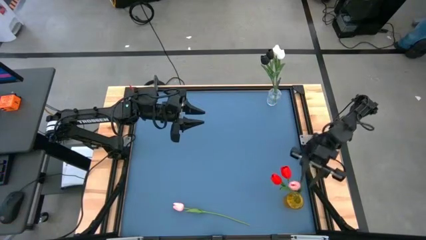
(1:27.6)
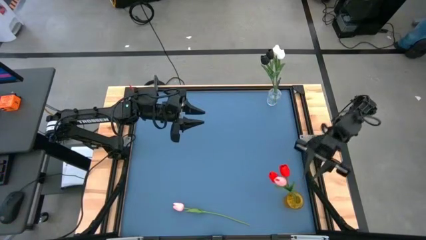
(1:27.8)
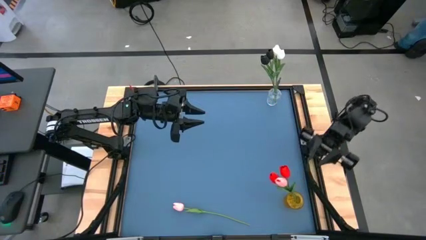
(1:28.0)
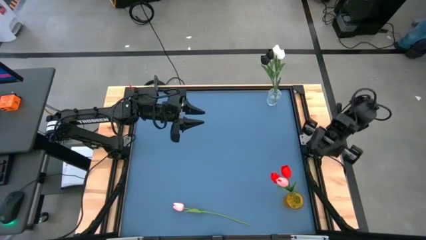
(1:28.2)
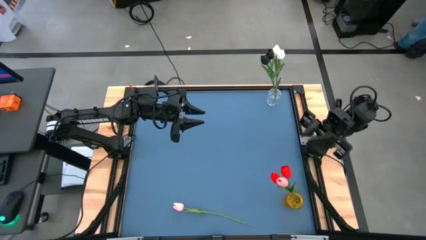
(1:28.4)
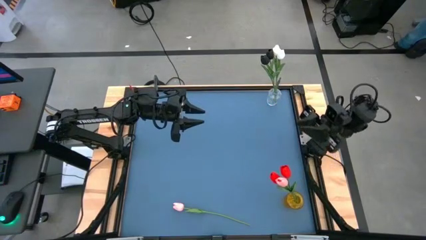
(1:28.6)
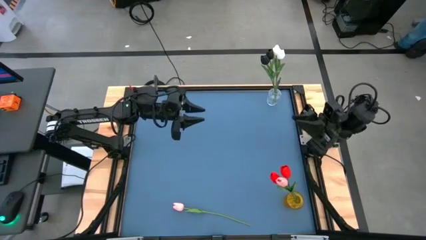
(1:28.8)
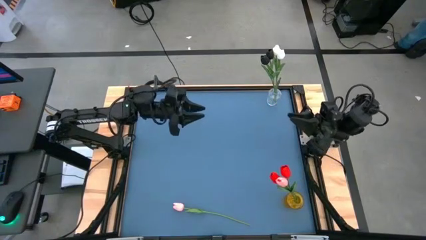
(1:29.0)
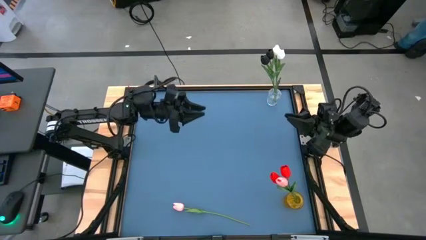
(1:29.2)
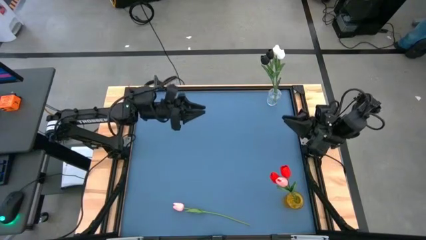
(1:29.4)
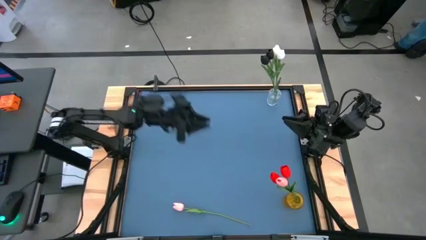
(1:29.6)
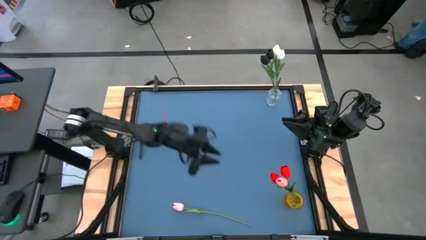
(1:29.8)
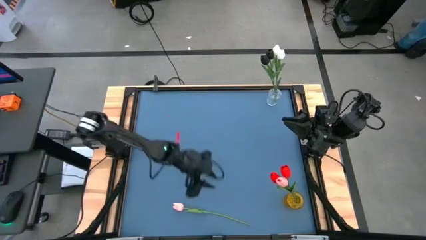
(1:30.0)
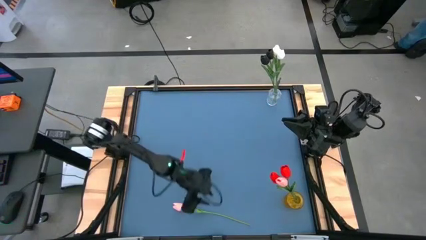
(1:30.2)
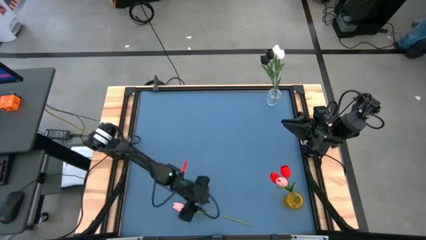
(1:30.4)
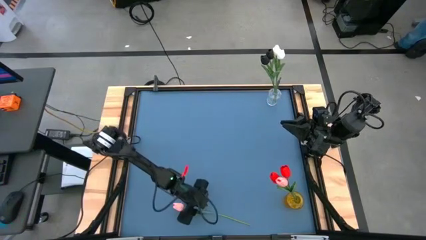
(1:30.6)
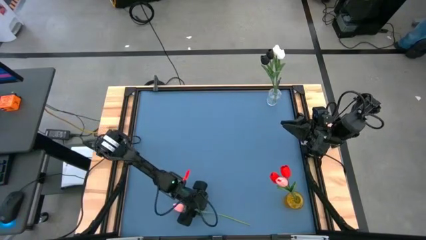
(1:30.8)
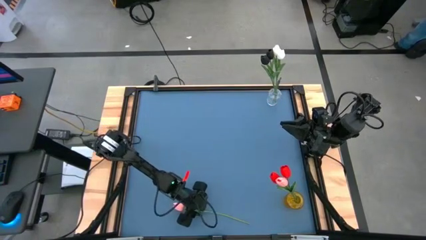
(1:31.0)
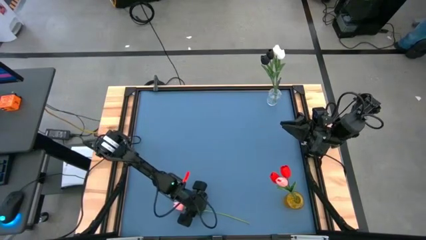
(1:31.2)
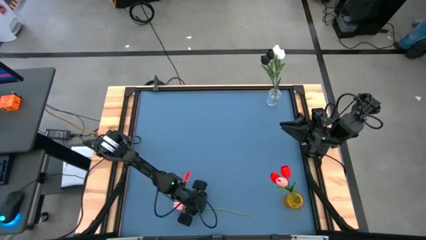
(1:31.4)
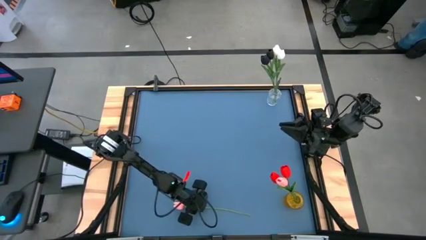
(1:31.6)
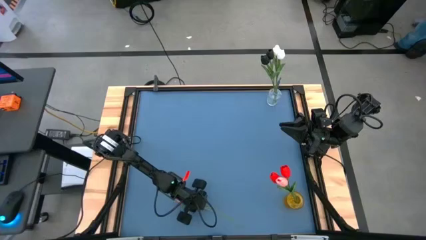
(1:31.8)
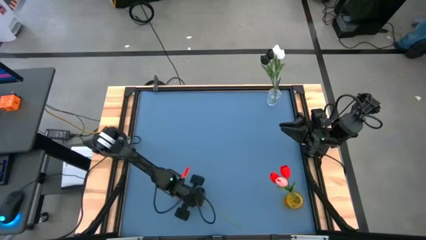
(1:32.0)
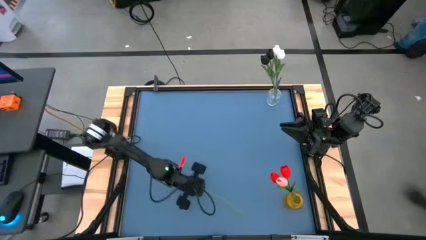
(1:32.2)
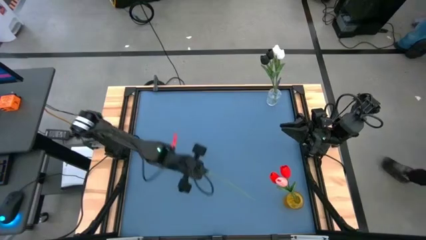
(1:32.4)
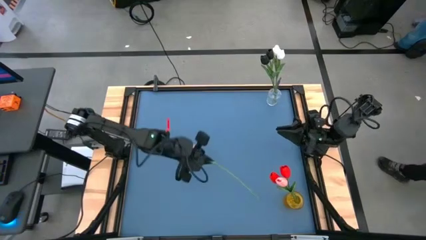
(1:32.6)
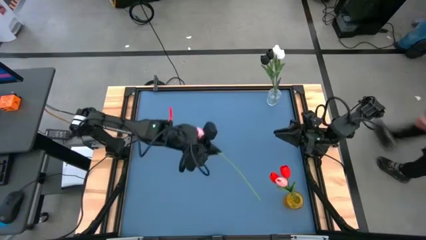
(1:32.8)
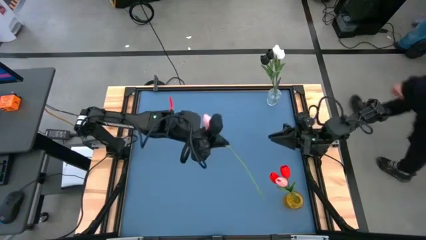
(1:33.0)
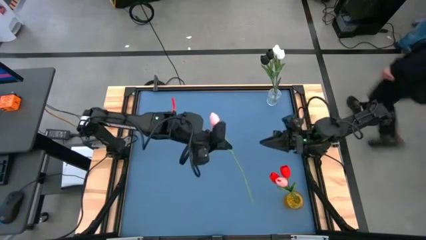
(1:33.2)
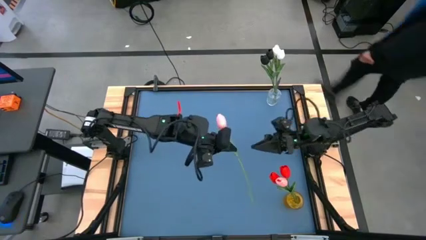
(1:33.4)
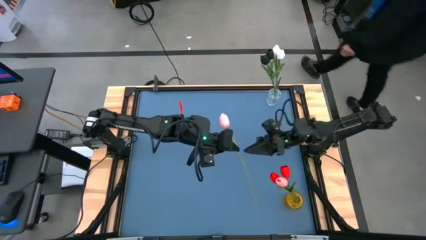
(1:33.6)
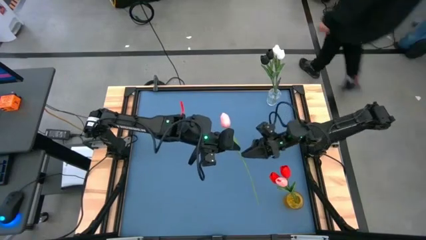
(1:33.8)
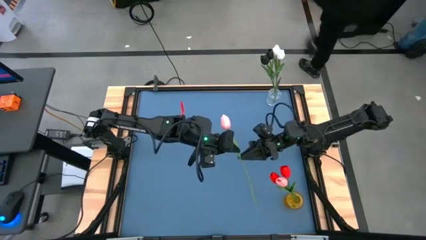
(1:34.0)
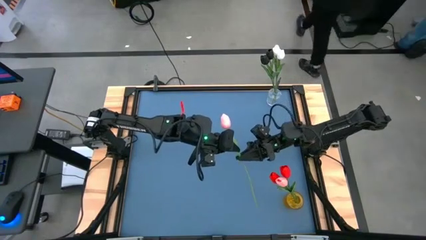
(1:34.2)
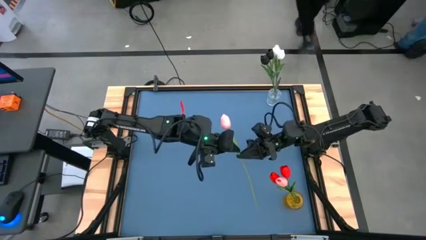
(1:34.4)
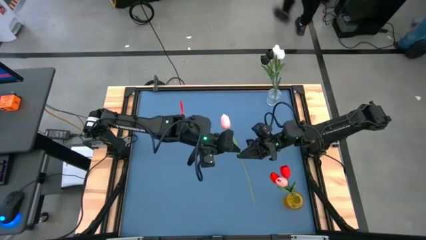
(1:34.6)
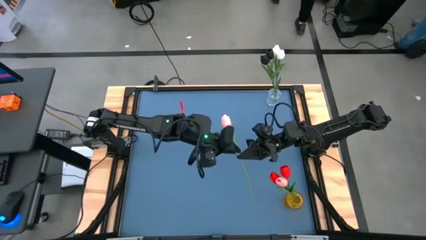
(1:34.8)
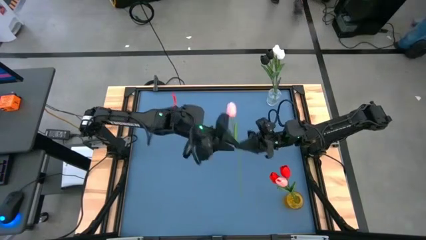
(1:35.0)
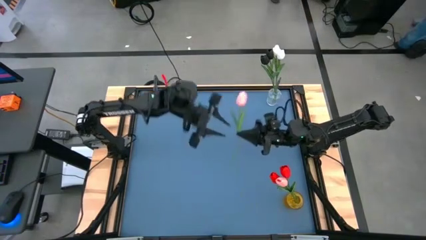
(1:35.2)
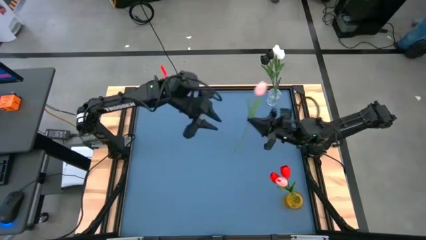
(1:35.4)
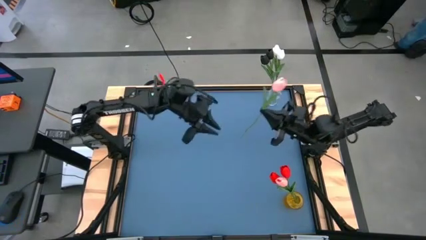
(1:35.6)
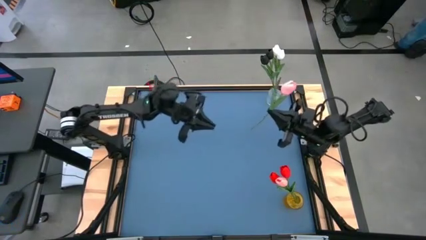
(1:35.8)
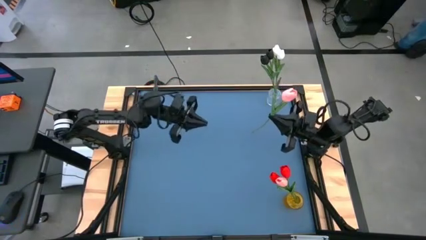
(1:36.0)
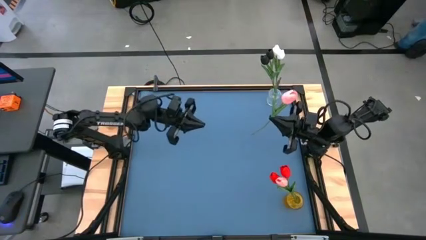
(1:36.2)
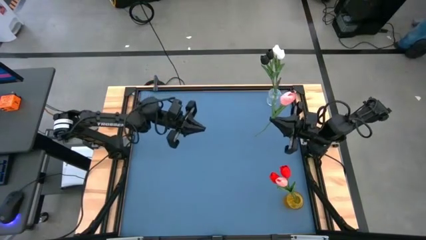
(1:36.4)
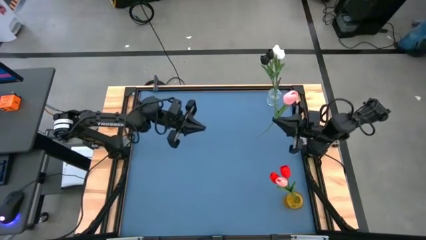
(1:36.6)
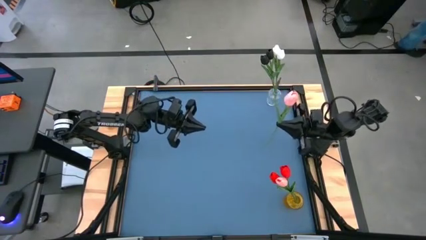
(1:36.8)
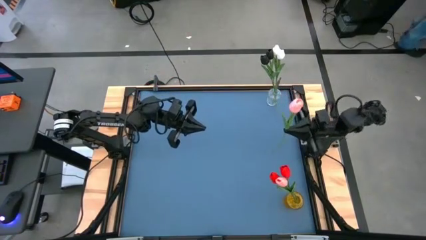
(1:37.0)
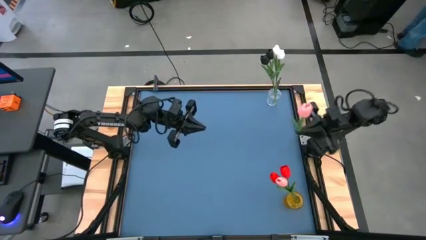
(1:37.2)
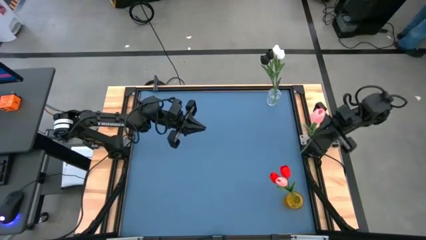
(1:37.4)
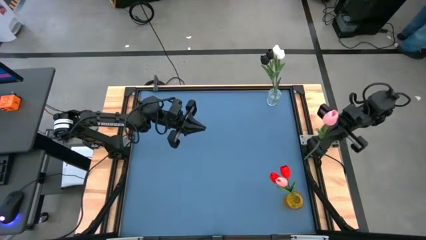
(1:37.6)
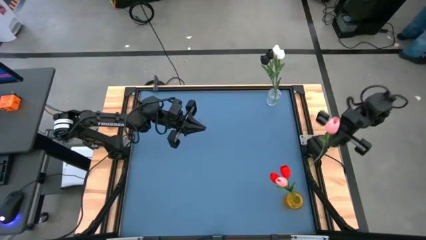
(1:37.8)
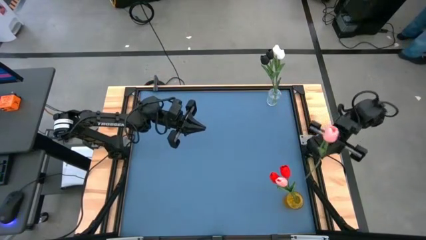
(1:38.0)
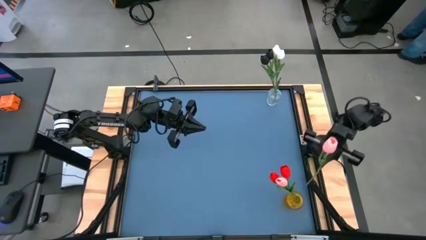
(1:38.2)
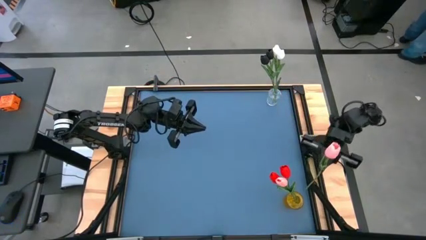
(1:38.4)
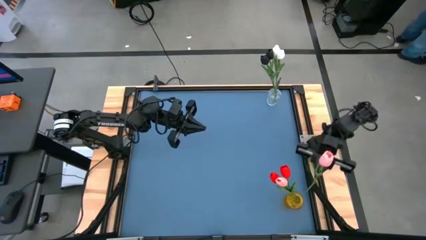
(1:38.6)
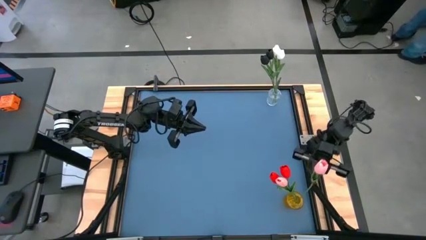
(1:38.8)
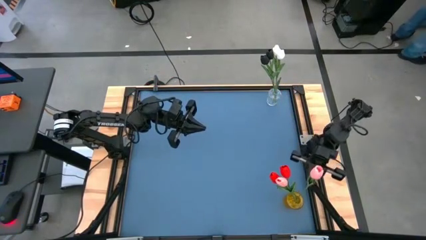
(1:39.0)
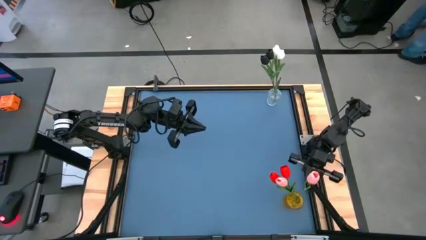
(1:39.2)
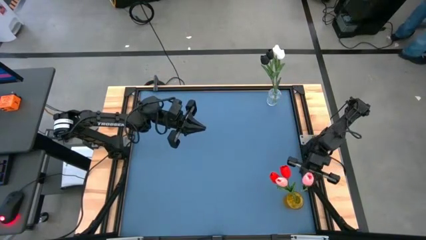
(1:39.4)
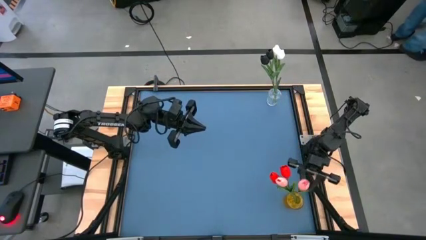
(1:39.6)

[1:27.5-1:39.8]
Task: Sort flowers into vase by color
Put the pink tulip into the yellow vase

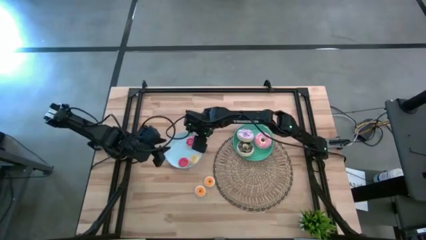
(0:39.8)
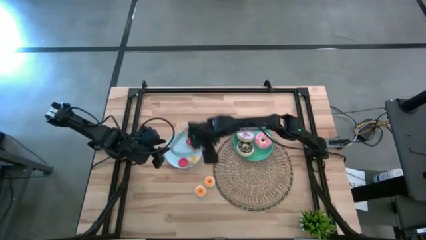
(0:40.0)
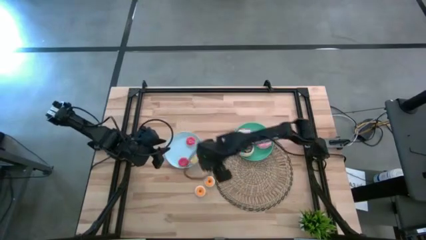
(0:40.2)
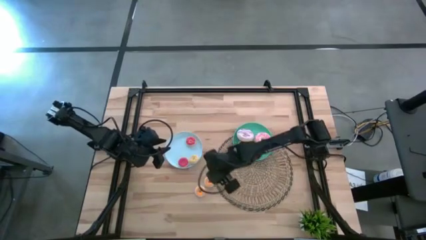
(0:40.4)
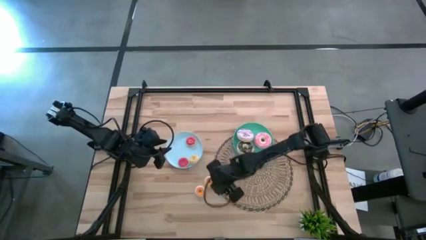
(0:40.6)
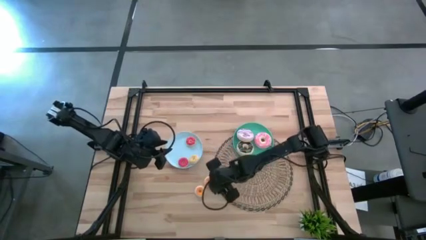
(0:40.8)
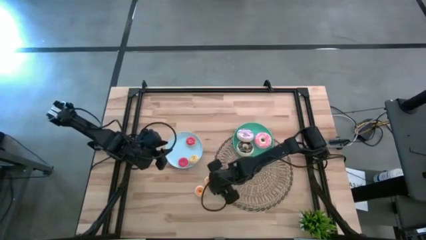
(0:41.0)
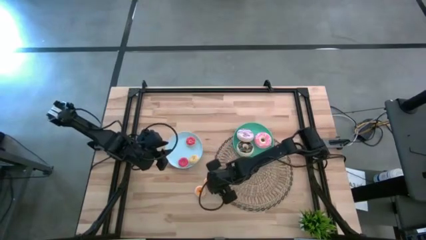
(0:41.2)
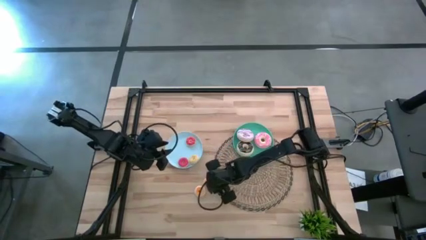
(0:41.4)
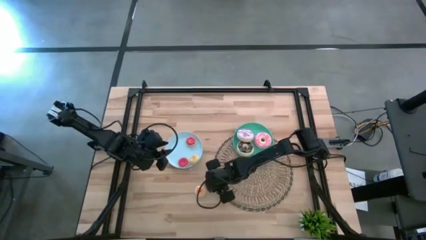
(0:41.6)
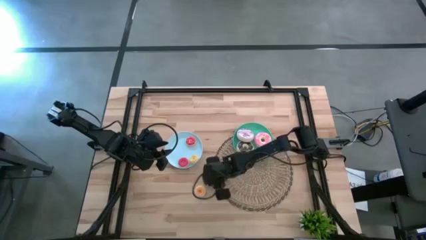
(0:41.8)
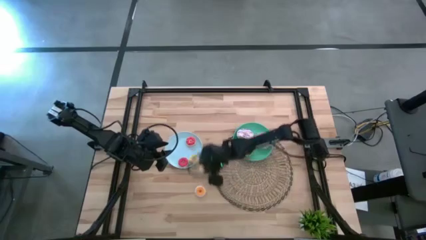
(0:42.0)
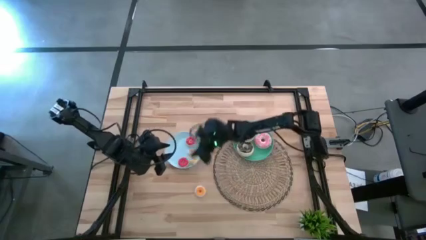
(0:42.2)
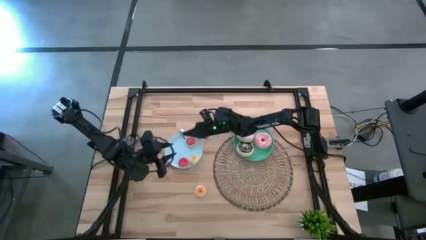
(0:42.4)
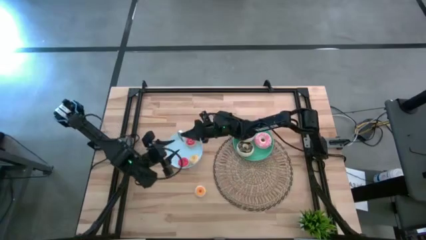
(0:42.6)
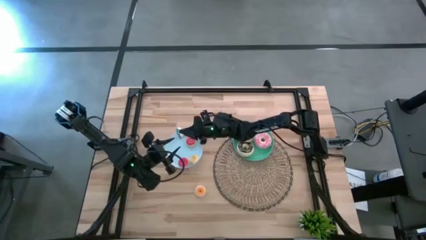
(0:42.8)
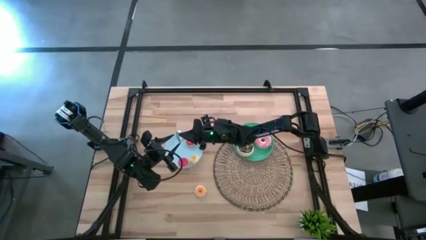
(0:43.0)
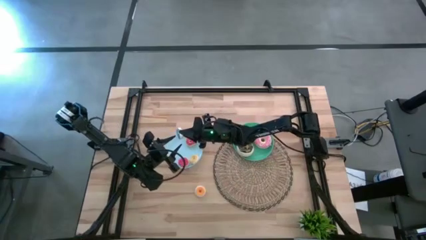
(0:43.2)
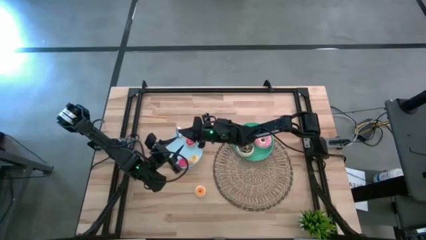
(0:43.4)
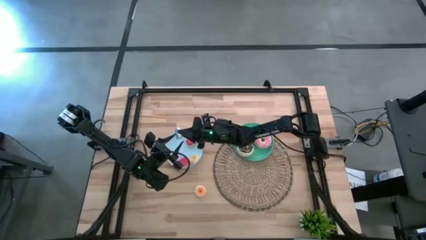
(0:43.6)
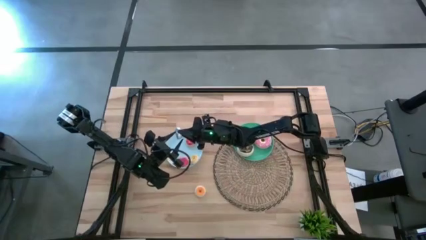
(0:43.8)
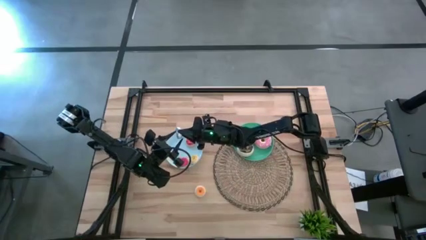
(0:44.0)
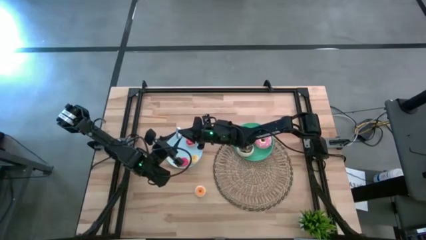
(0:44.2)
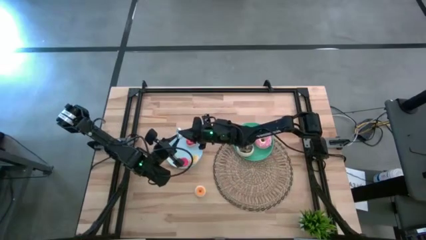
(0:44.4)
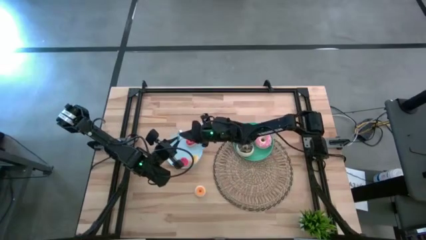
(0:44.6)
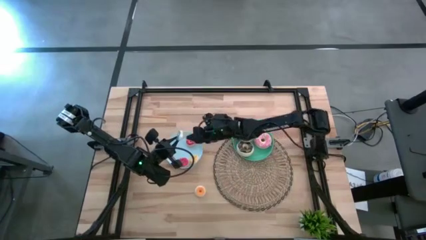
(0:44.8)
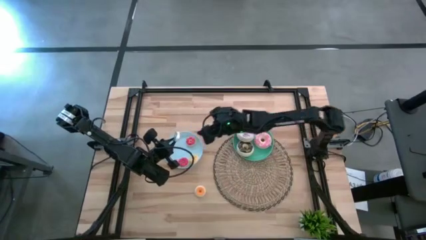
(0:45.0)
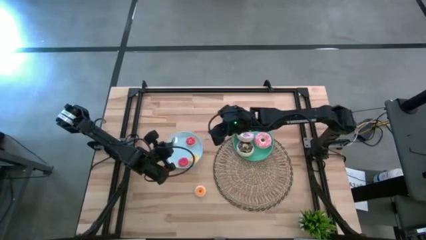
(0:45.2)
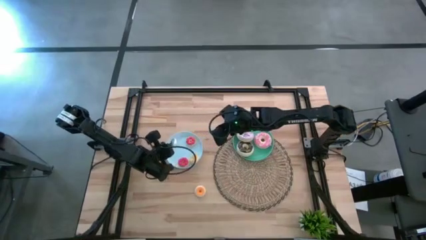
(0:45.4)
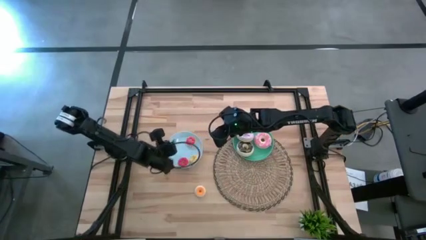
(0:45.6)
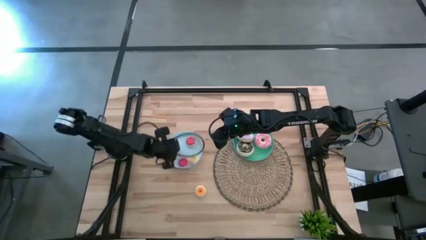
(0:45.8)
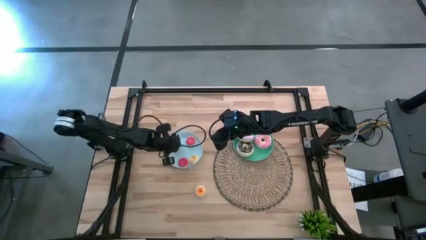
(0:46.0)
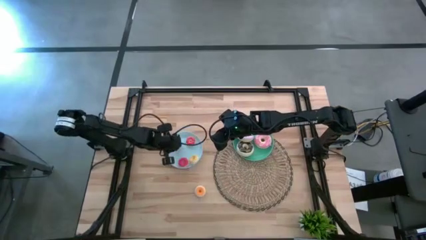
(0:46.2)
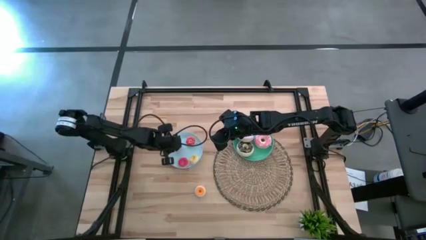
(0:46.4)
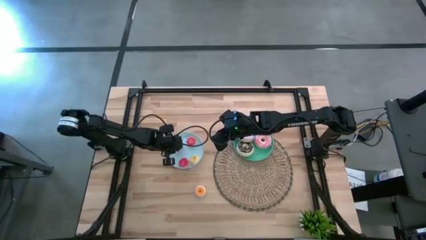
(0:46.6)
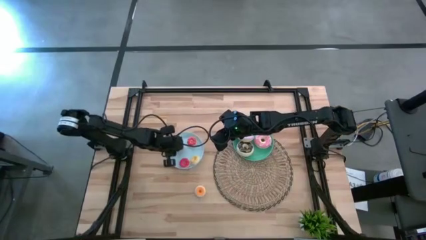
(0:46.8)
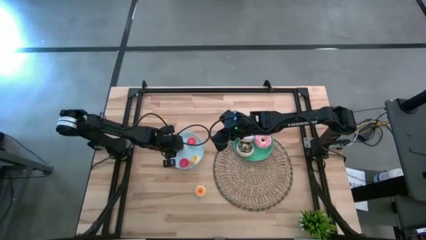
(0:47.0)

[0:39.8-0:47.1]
Task: Pick & Place donuts
Put the blue doughnut on the blue plate
